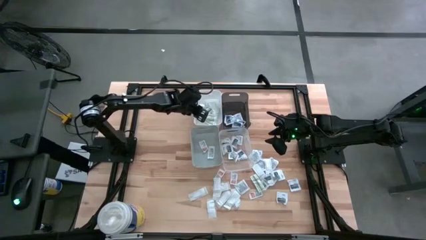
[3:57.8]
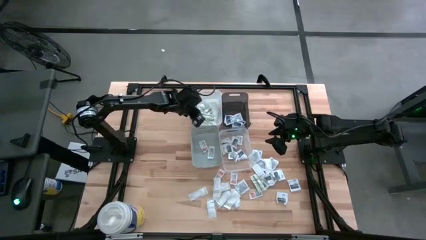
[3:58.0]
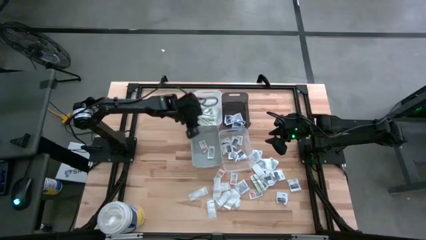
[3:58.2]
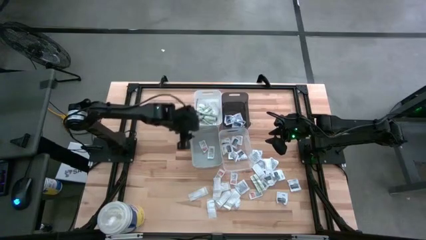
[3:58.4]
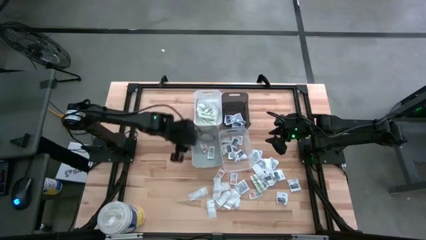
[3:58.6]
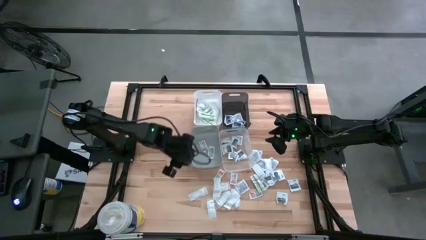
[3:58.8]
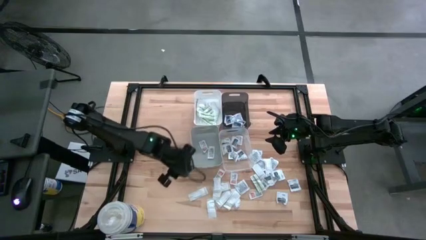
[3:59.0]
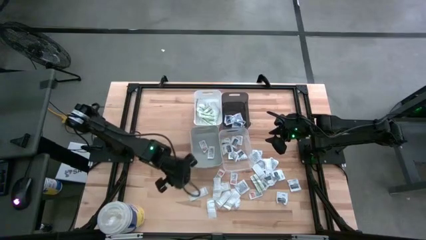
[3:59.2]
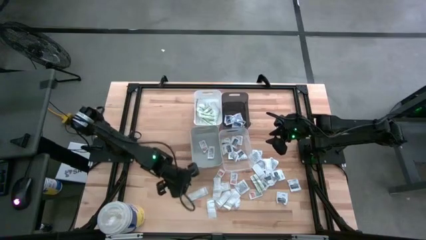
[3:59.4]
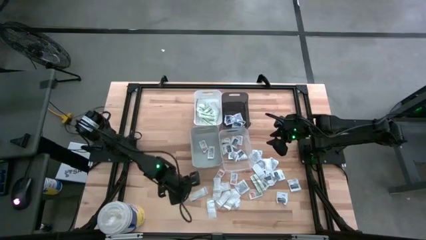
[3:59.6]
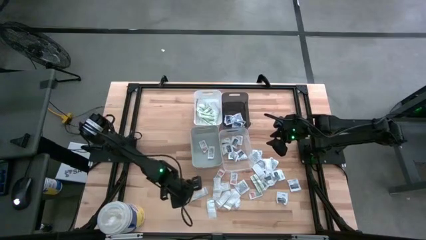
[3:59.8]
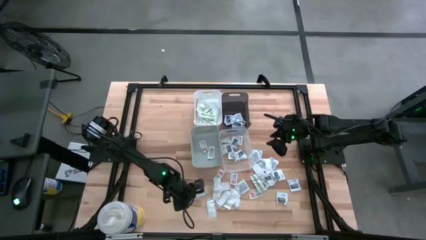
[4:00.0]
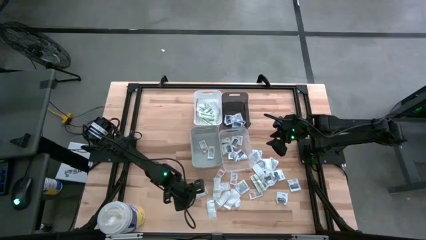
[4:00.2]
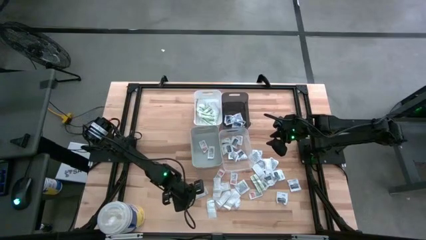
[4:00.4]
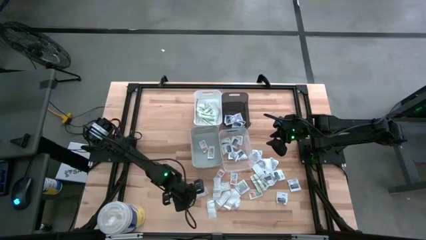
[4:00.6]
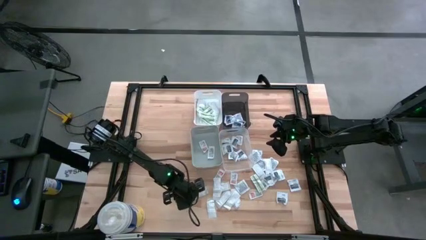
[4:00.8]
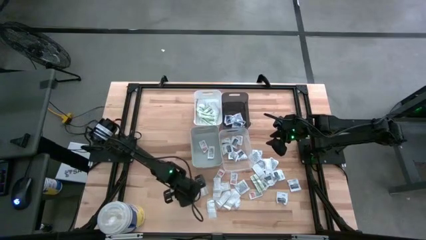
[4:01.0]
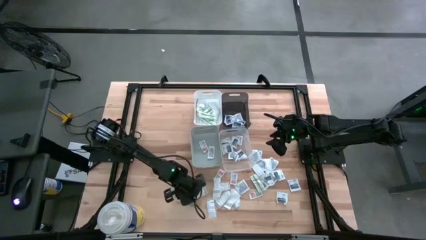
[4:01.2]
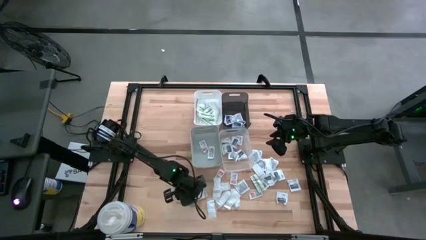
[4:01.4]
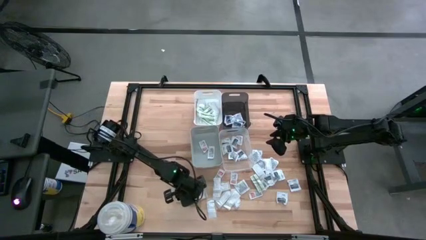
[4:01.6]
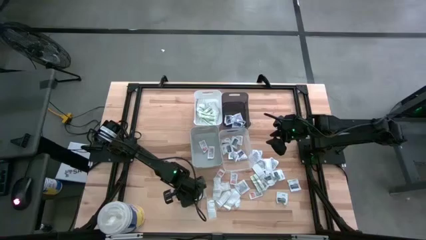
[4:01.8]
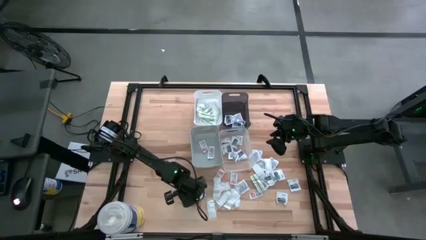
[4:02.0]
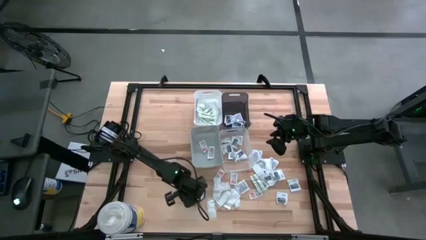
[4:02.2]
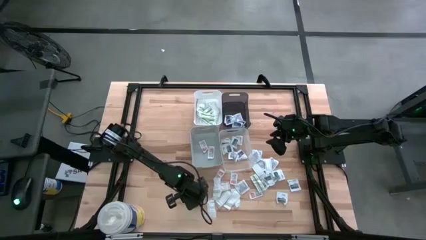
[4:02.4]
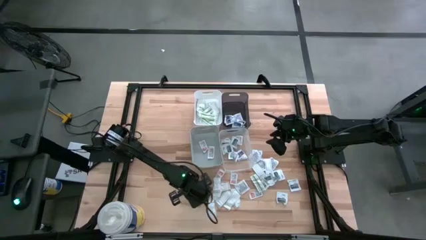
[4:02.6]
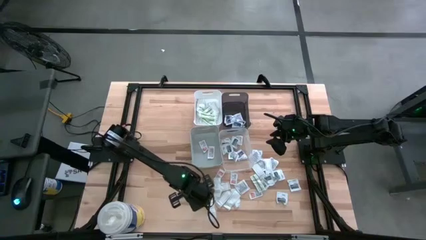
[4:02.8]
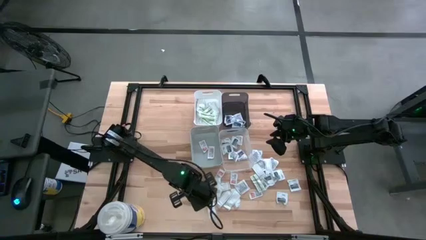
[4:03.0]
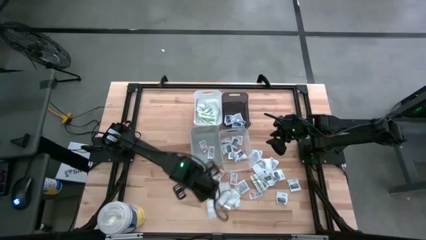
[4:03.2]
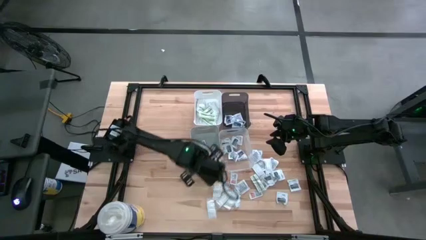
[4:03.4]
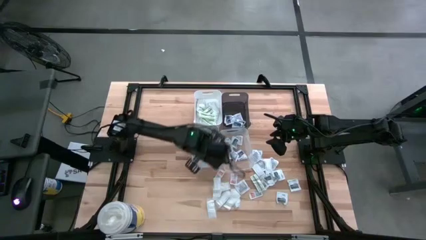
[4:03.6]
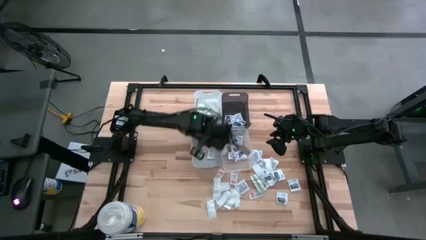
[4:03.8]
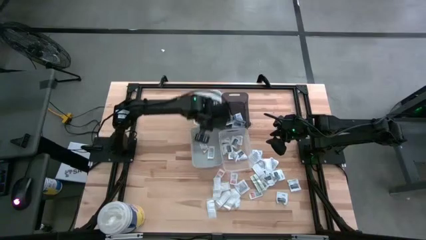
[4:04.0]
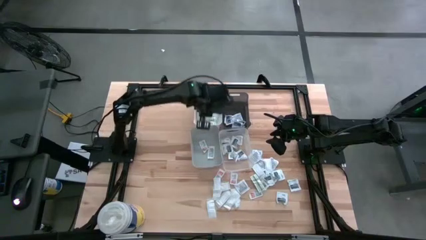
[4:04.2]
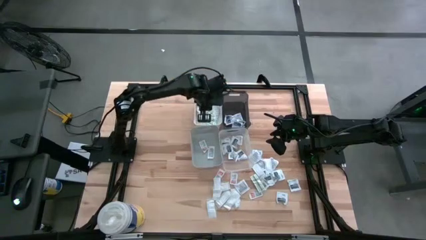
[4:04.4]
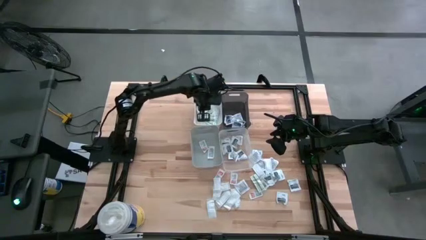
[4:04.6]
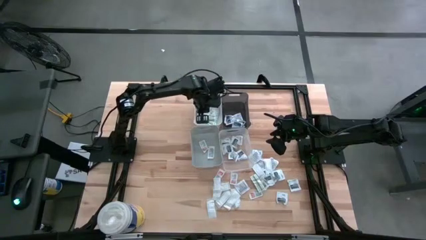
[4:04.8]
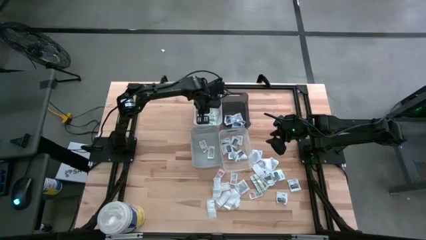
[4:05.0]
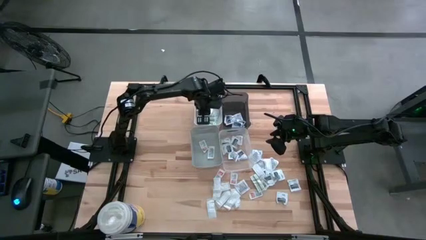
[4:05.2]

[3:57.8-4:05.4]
Task: Pick & Place First Aid Supplies
Put the green bandage pack into the white bin

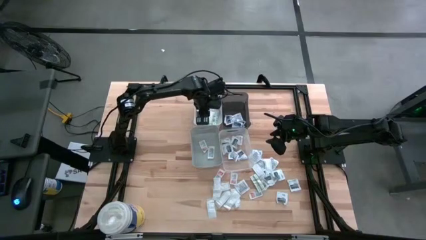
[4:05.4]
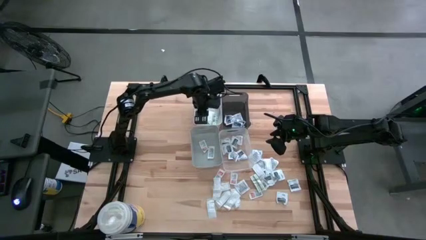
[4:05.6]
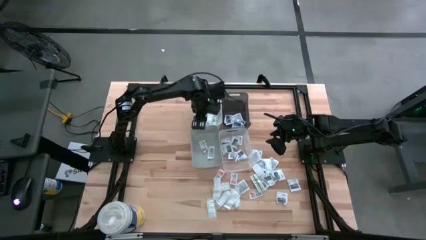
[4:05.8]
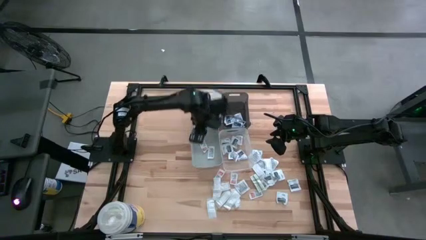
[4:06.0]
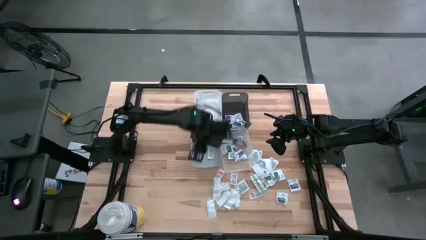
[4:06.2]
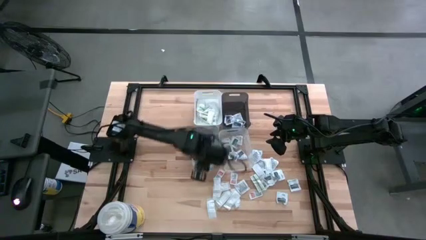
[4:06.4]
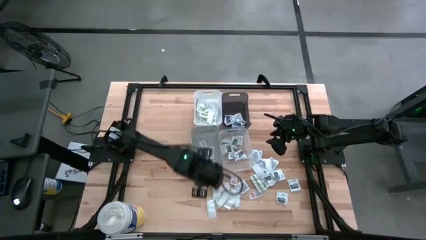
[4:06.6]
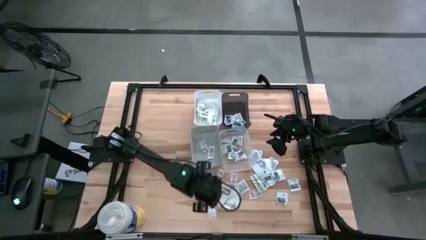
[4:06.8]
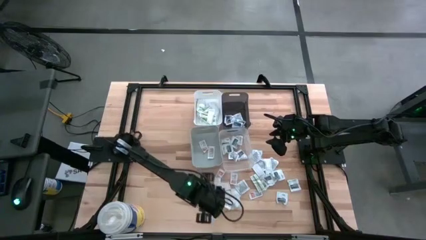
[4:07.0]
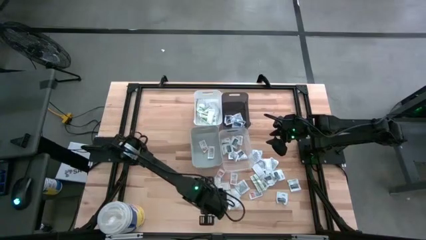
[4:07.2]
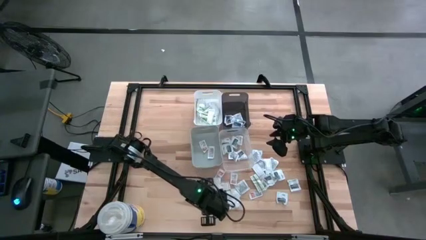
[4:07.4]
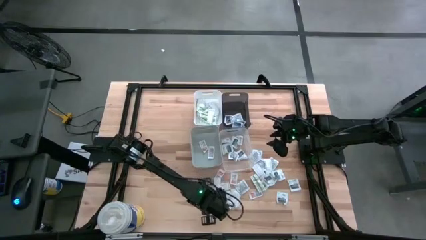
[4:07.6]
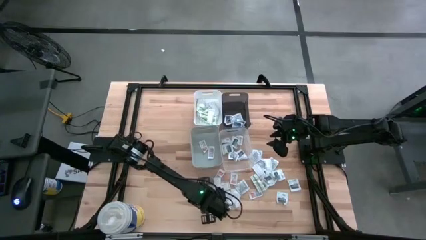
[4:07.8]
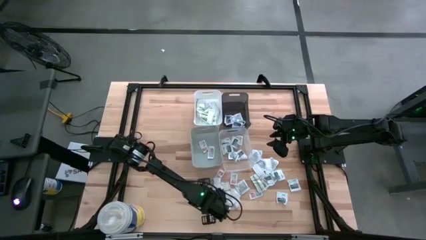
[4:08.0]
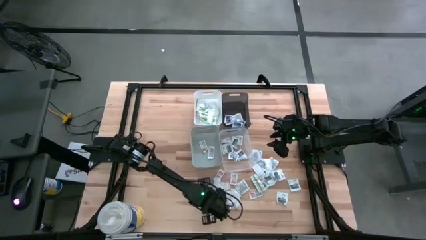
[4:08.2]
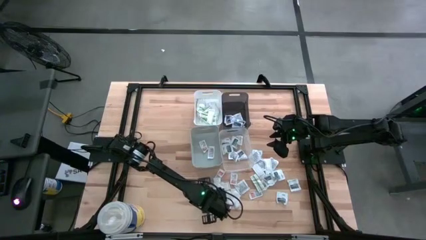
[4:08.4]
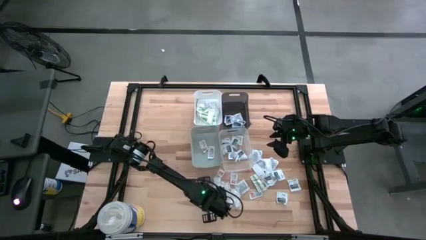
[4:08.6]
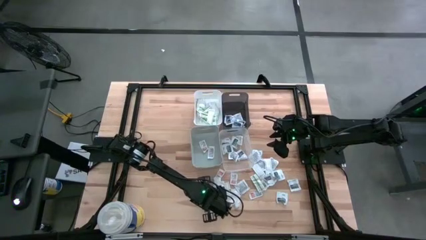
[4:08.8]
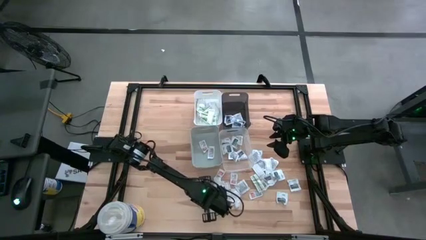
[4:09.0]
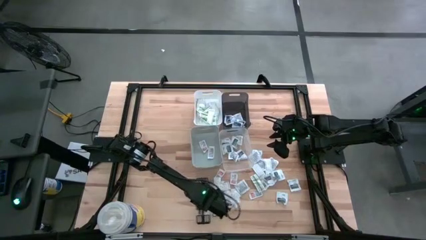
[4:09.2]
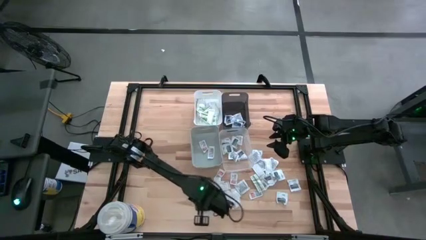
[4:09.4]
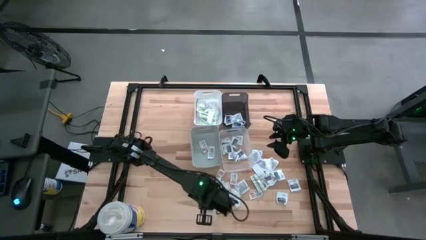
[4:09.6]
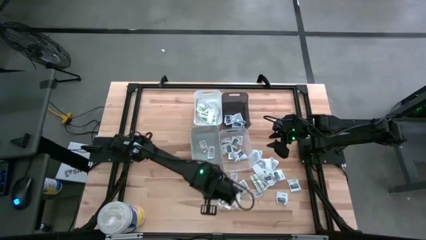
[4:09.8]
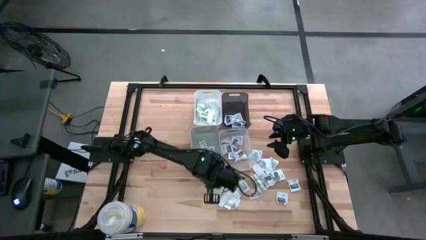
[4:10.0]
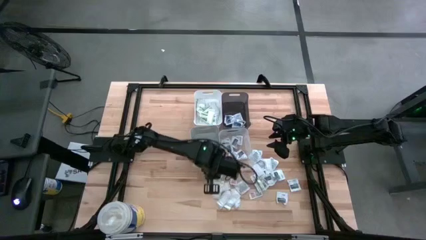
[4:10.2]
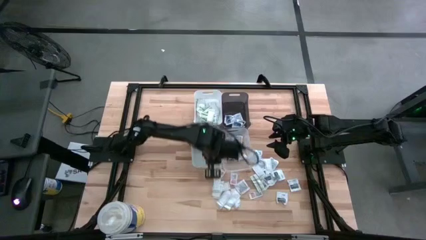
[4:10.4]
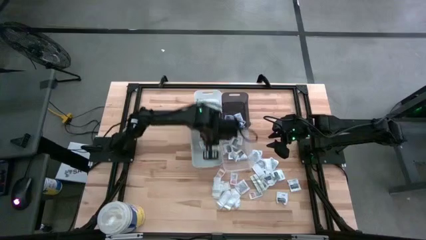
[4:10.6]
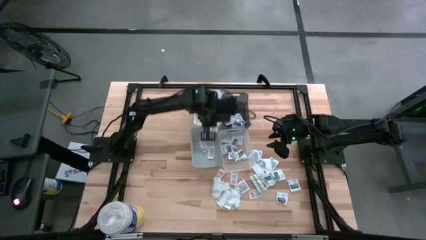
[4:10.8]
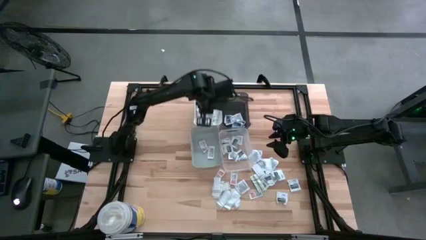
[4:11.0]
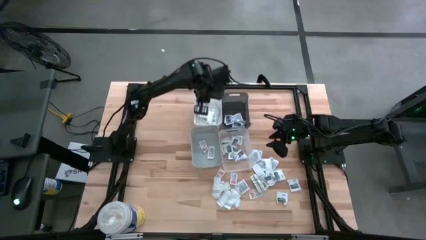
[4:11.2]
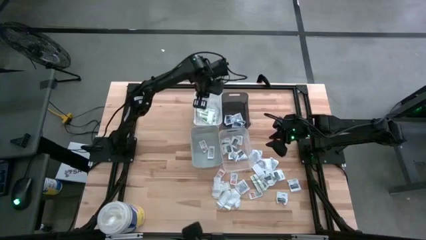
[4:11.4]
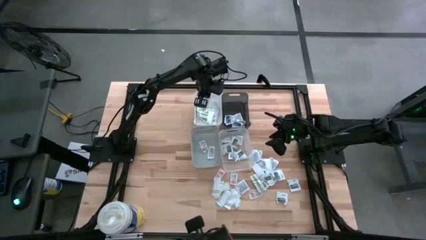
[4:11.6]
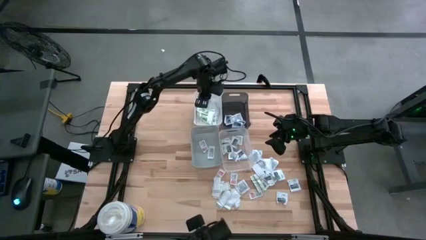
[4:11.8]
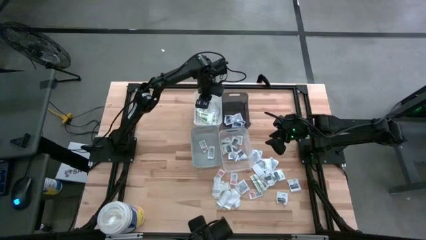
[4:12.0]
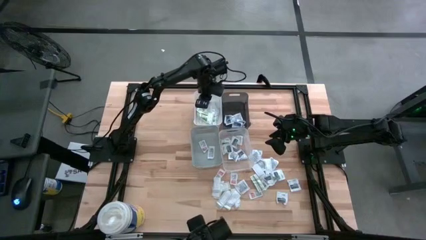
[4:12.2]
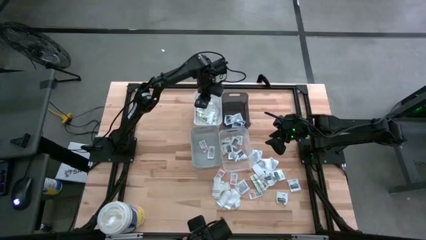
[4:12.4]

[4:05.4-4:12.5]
Put the green bandage pack into the white bin
